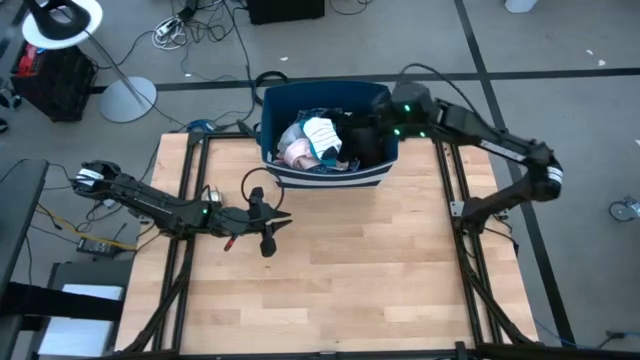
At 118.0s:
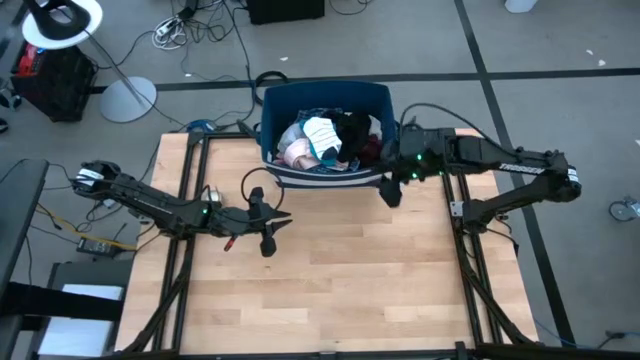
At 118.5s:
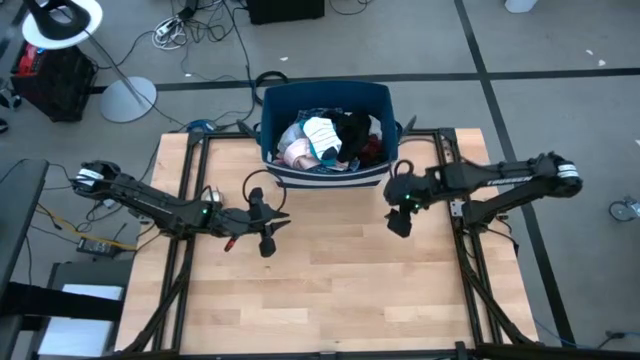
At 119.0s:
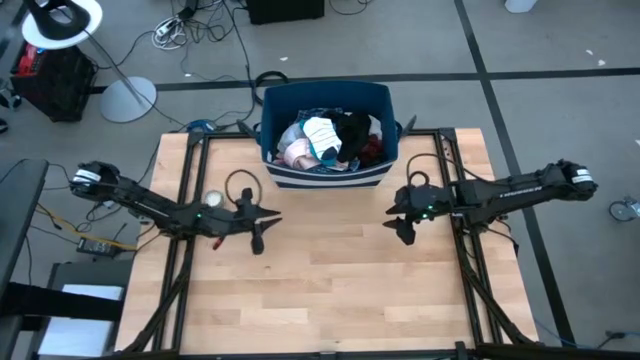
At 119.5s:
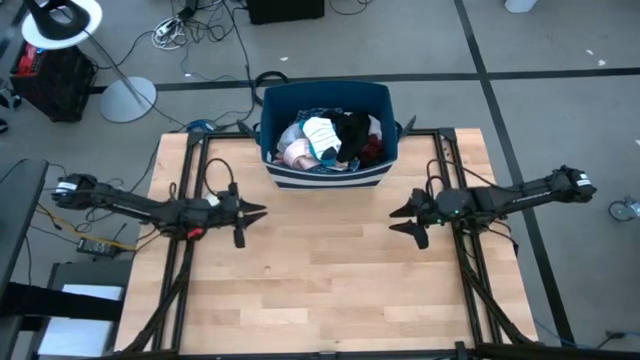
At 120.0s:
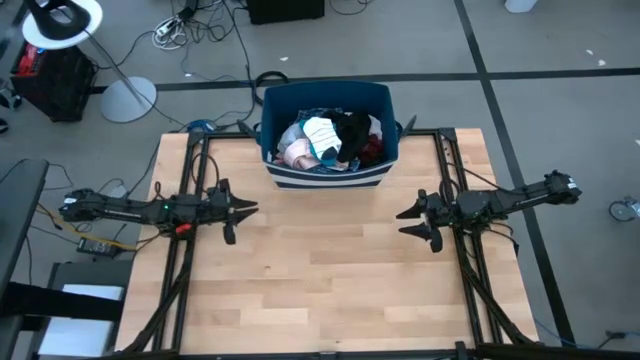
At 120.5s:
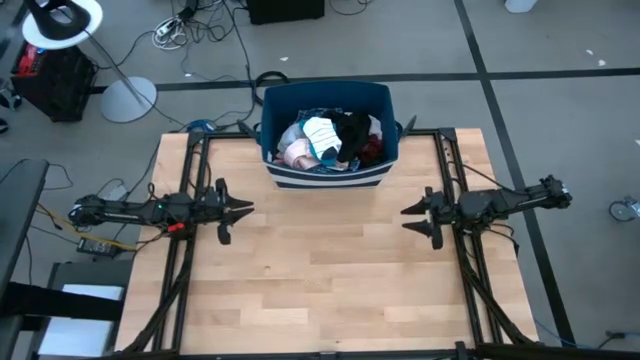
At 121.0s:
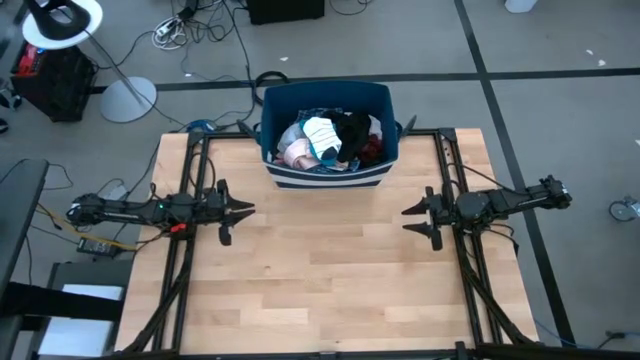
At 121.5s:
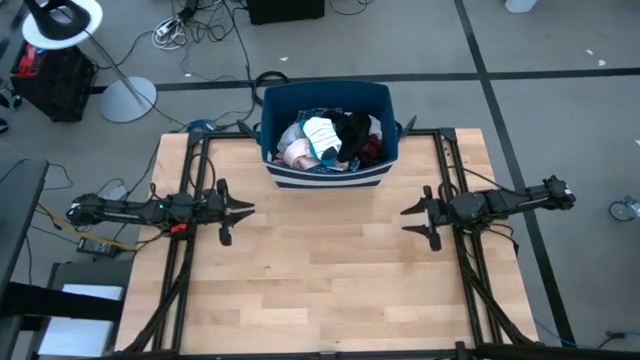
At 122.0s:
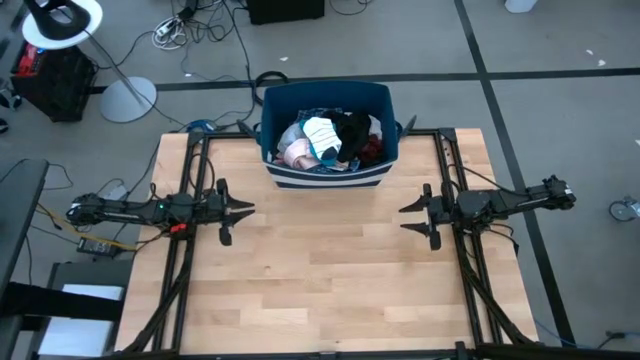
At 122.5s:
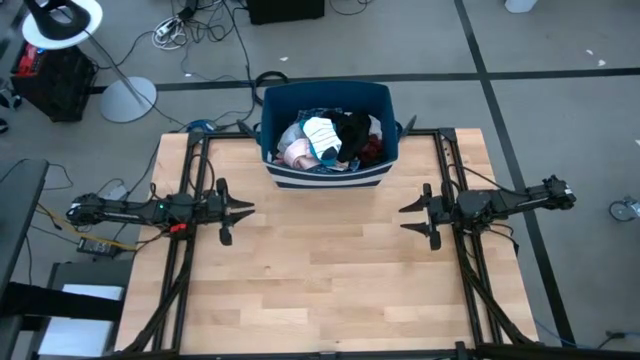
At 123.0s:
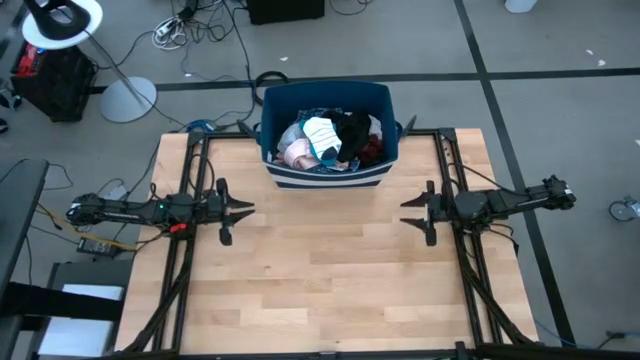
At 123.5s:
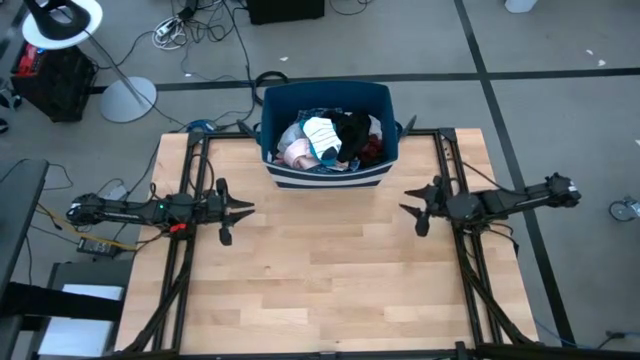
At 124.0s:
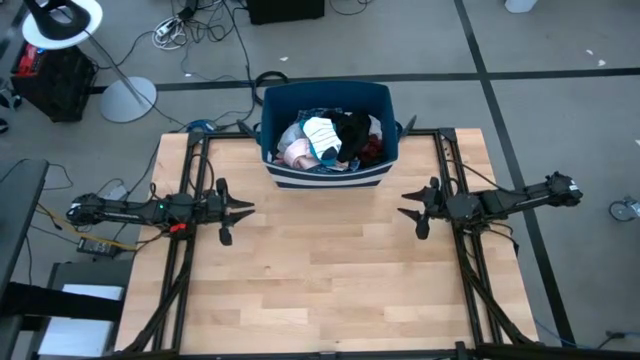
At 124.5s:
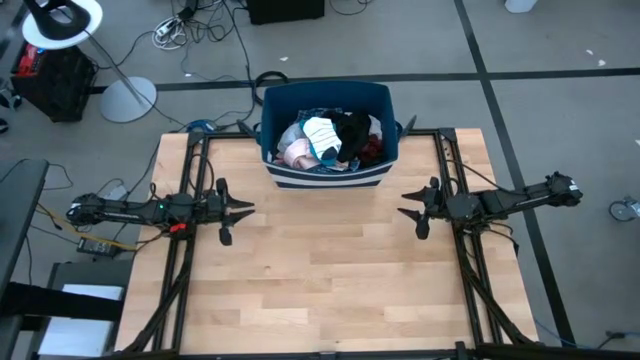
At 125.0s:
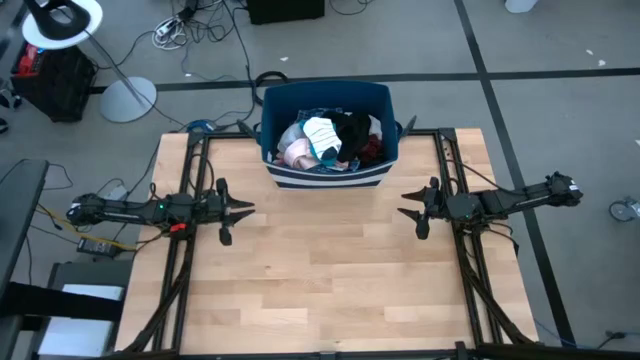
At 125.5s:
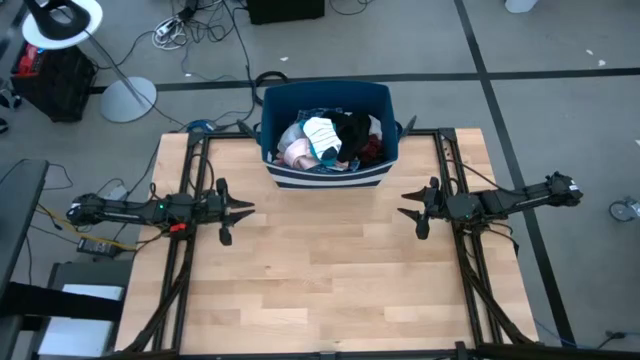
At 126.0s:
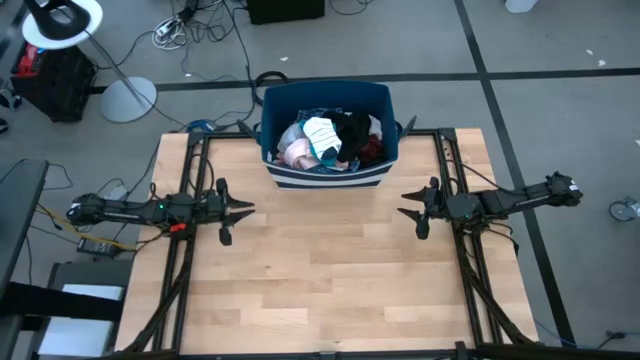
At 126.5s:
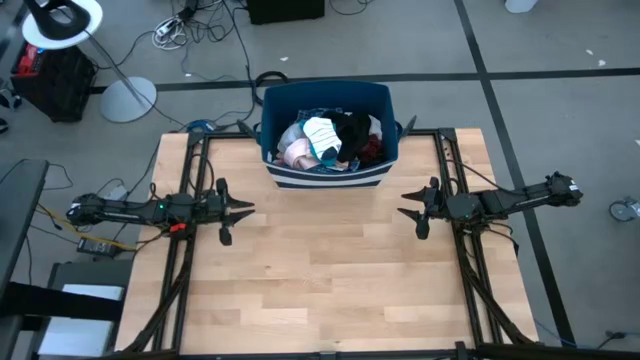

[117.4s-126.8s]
Task: Sort clothes
Return to Home Position

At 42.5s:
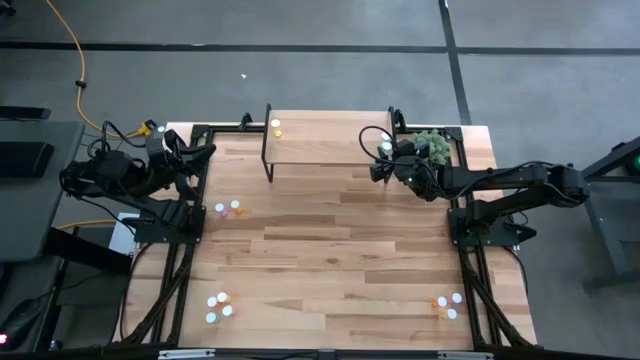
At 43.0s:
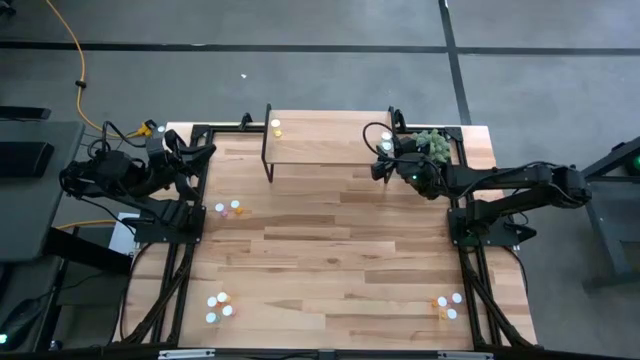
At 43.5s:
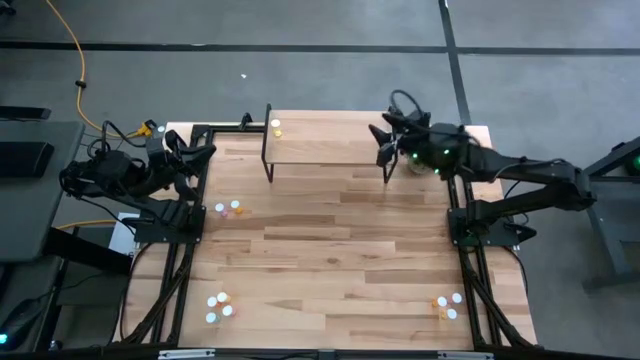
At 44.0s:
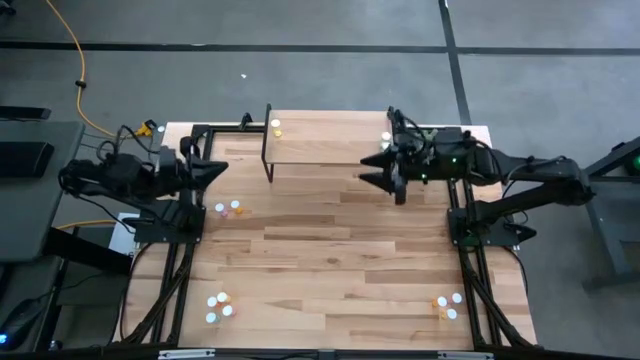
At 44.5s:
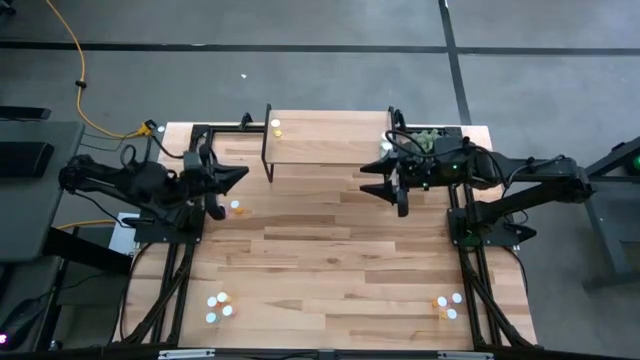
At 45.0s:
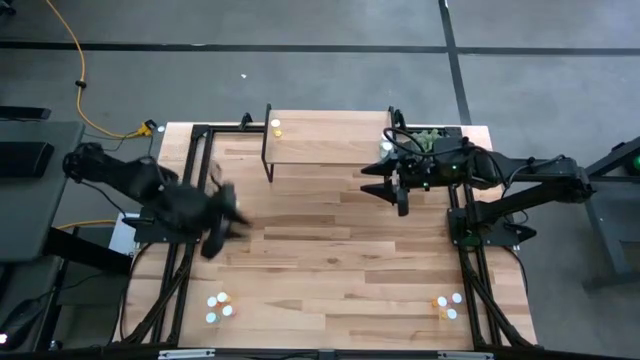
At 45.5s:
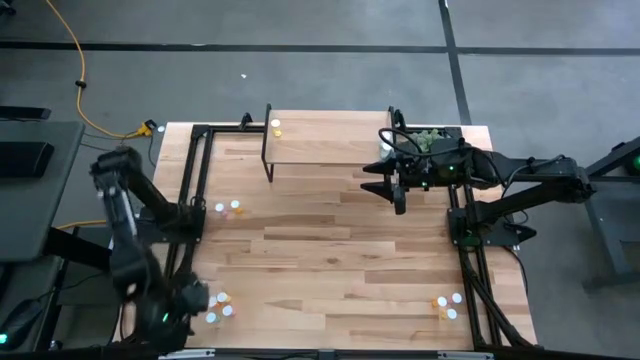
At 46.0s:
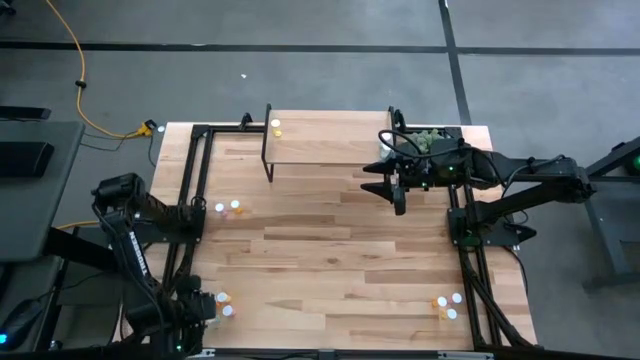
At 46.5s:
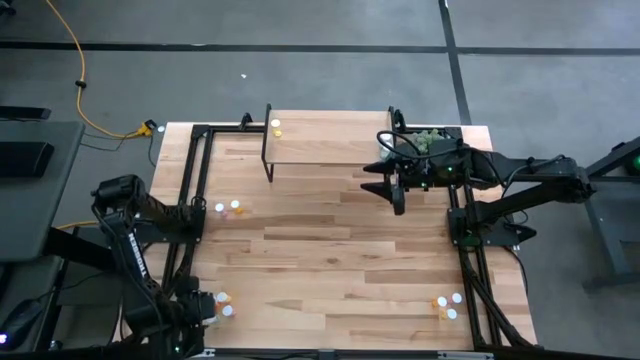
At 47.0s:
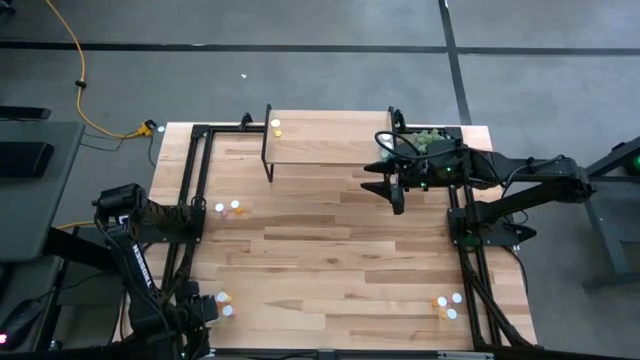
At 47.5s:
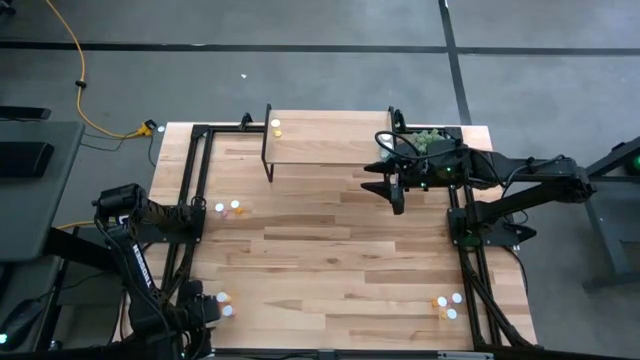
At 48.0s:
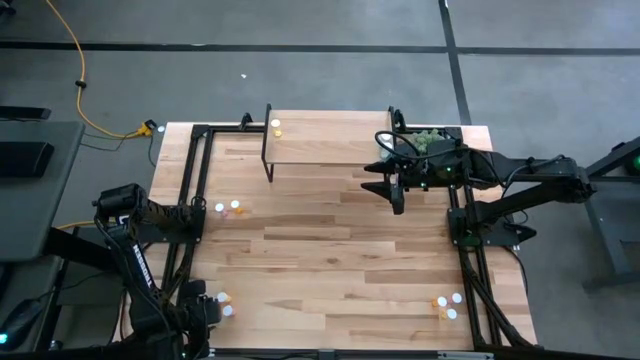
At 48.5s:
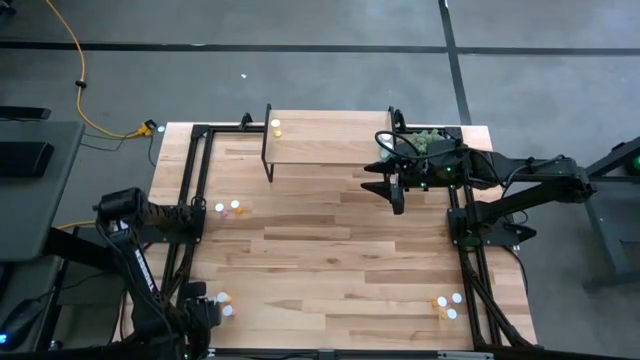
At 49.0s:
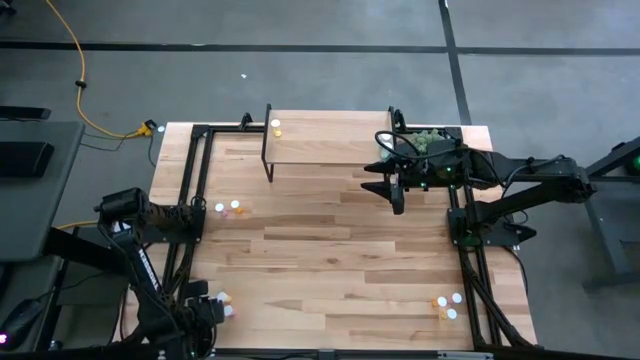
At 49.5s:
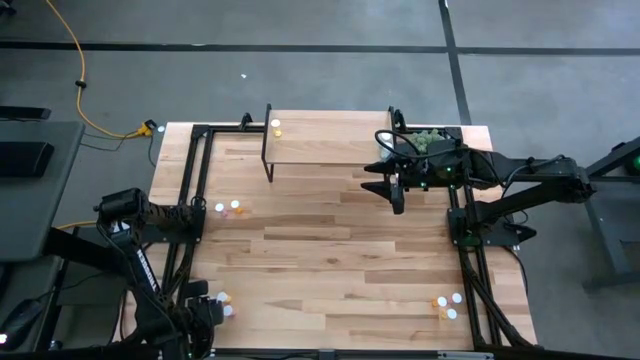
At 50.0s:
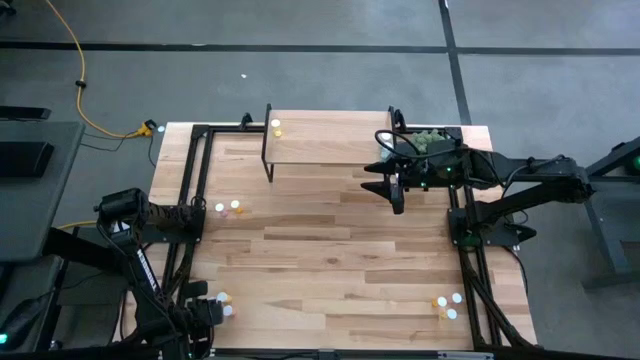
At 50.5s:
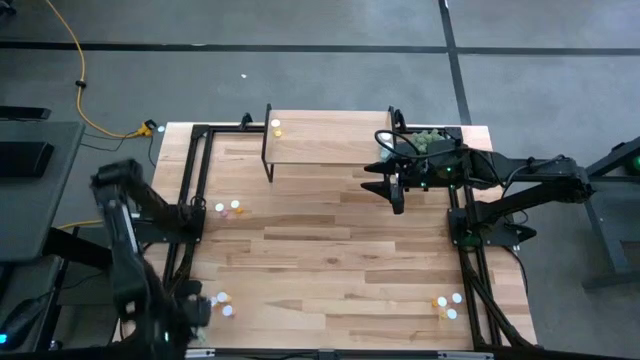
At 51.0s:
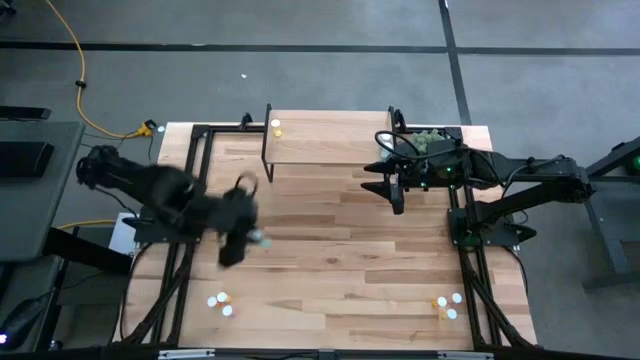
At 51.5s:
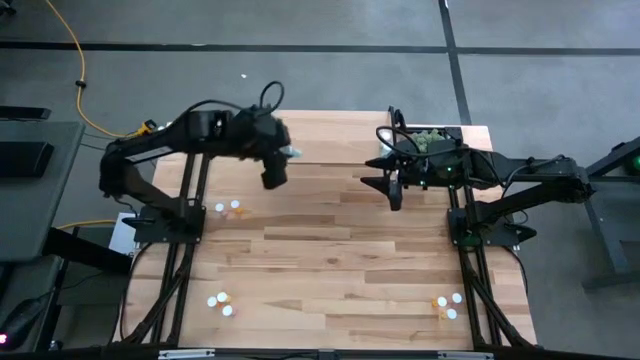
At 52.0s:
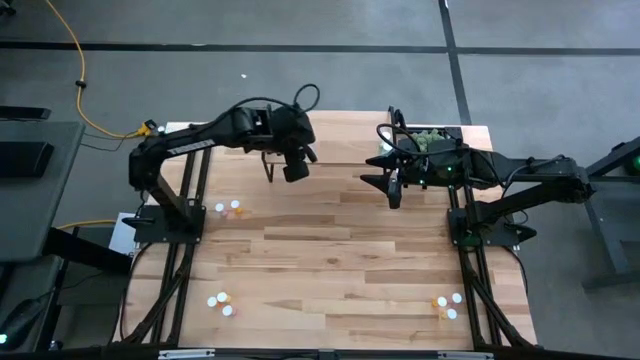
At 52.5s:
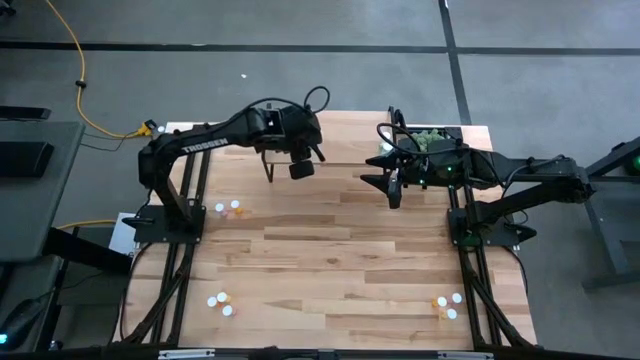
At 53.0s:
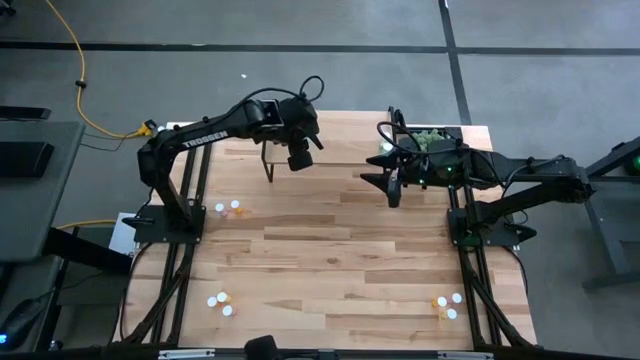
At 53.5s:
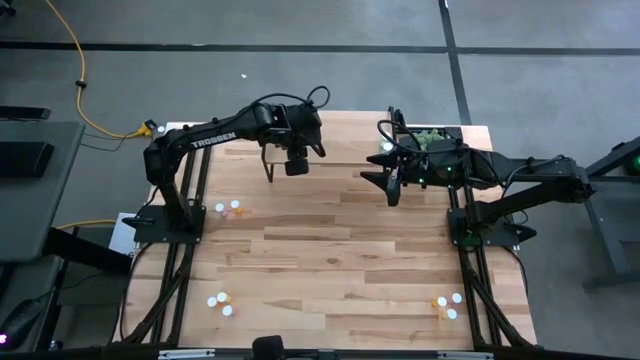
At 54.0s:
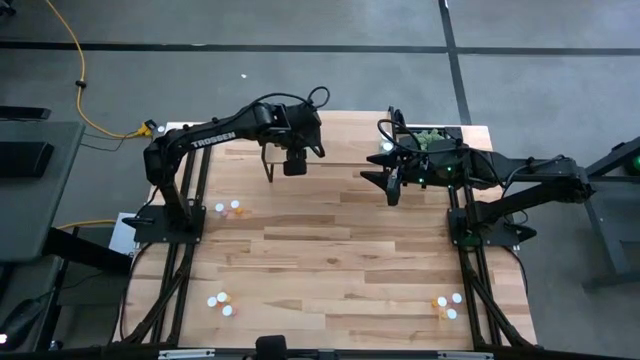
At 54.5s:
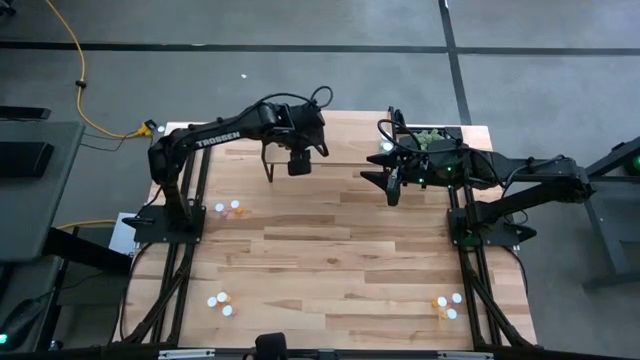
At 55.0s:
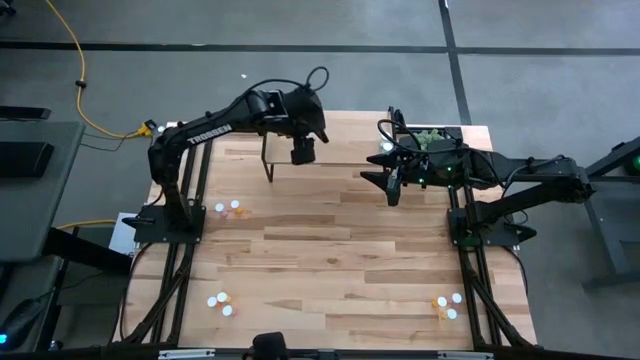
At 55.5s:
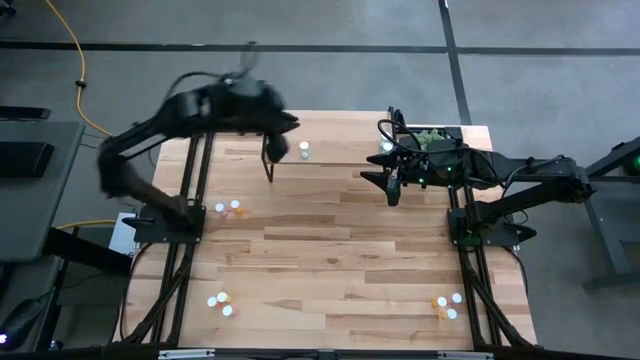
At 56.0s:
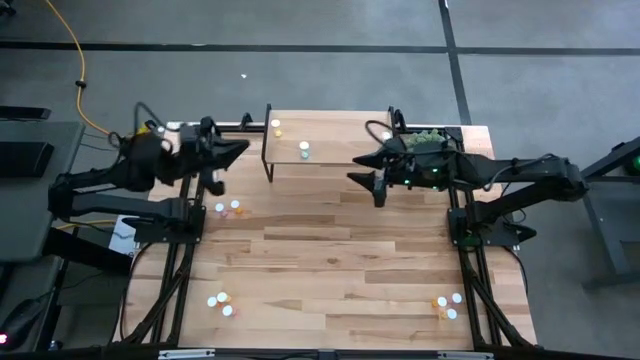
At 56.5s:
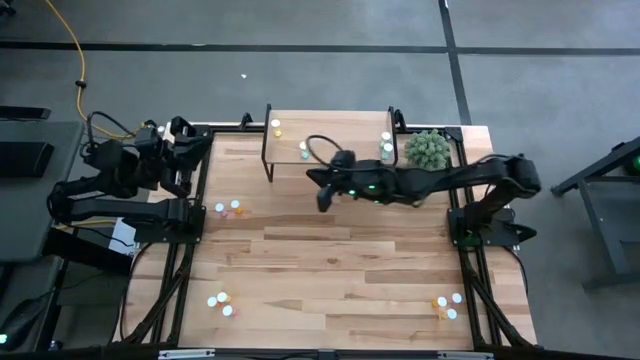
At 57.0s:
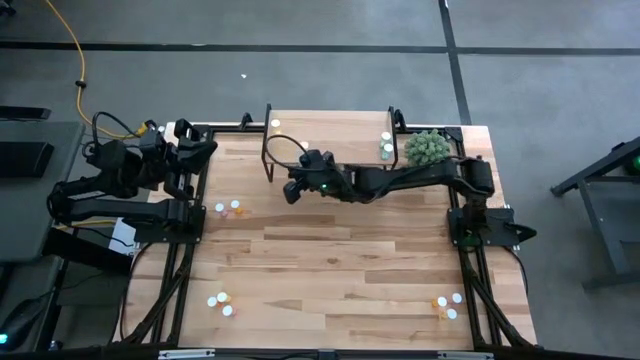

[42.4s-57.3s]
Task: Pick and place medicine bottles onto shelf by color
Put the blue pill bottle aligned with the other blue pill bottles on the shelf
